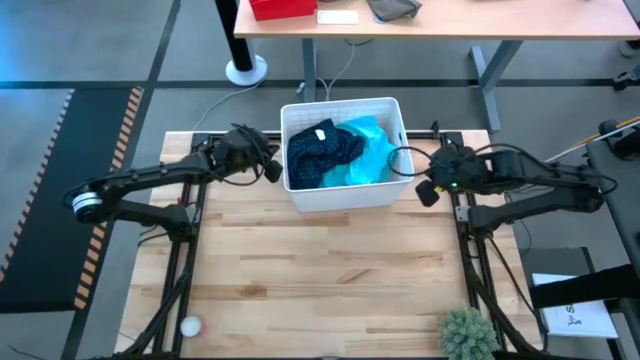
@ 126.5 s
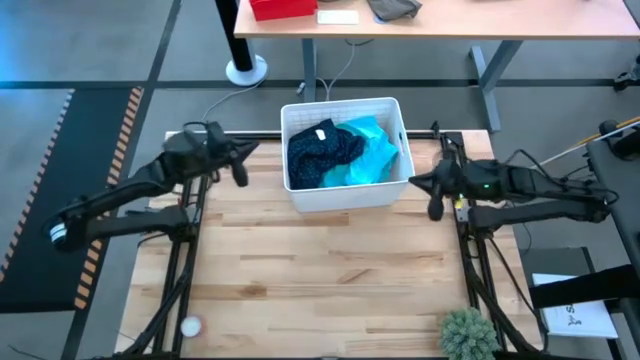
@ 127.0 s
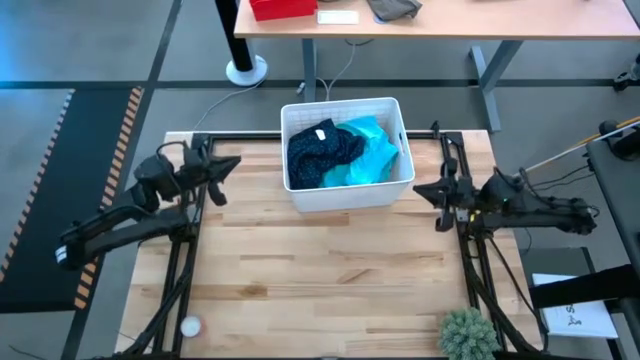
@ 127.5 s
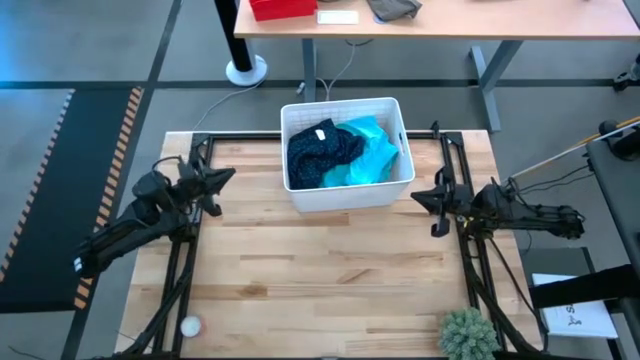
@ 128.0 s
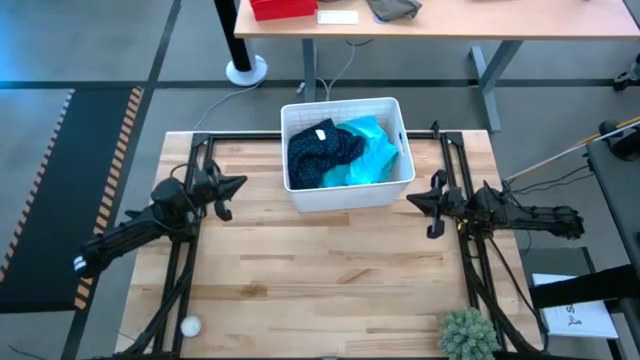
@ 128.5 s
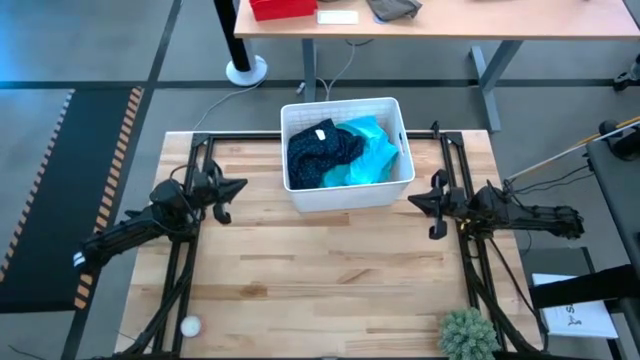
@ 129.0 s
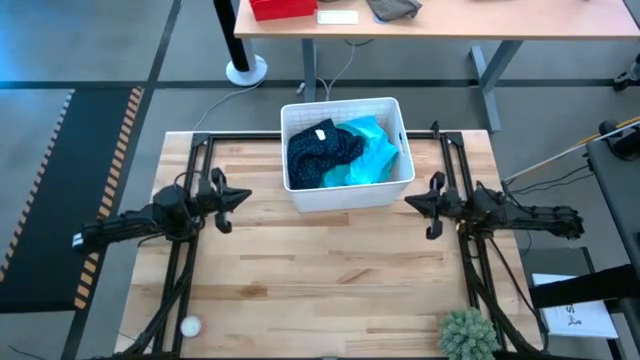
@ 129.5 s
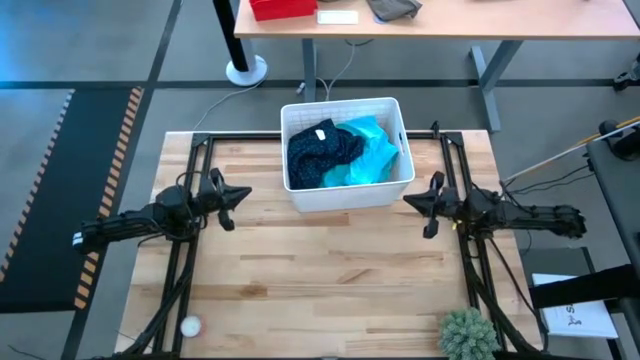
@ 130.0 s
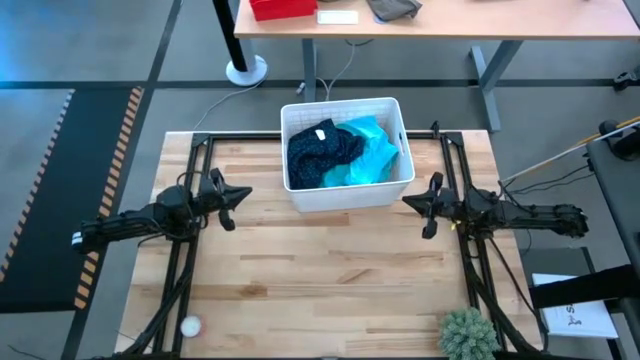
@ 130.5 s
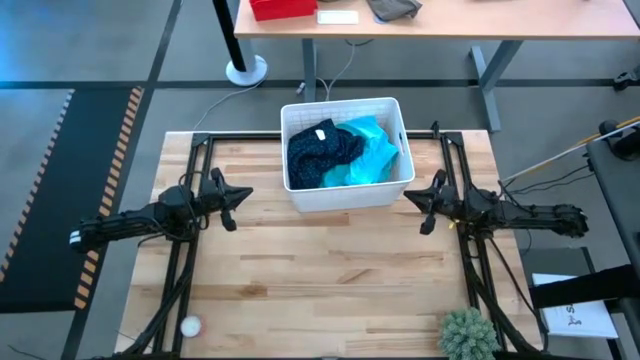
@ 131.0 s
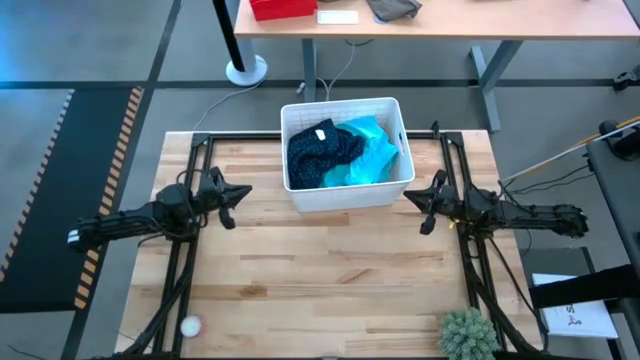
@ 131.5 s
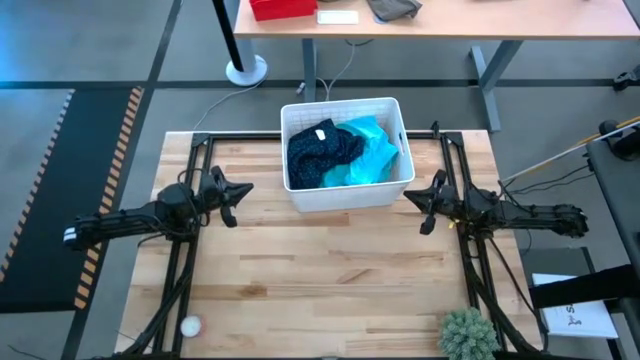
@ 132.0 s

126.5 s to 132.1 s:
Task: Sort clothes
Return to home position

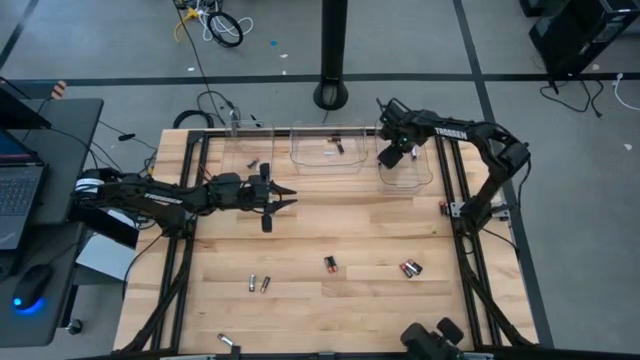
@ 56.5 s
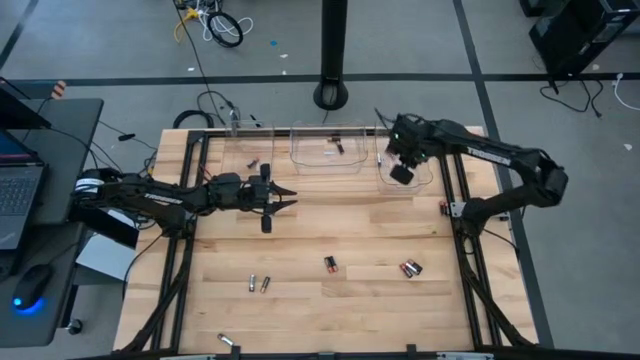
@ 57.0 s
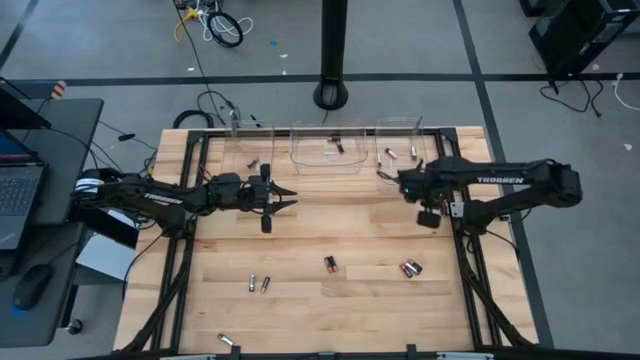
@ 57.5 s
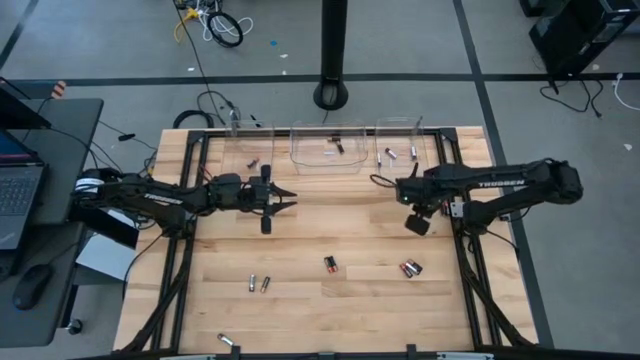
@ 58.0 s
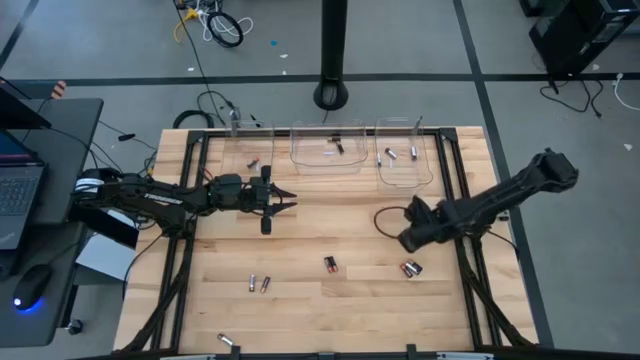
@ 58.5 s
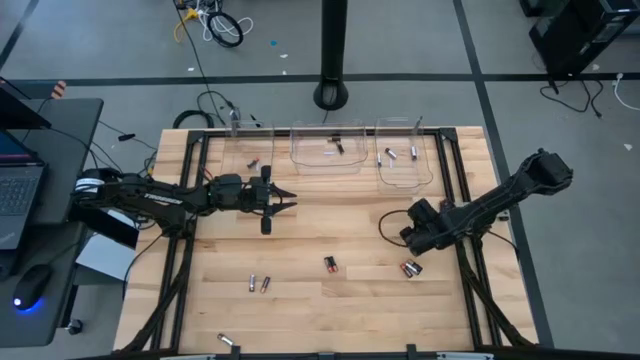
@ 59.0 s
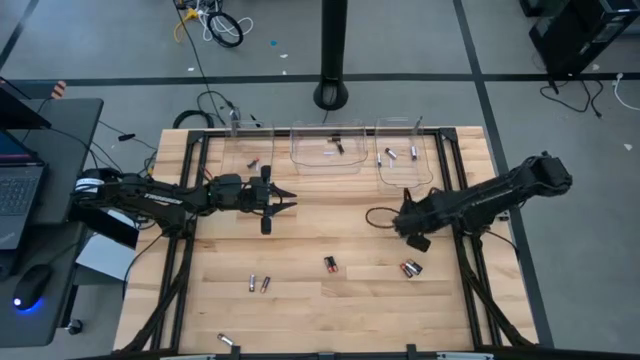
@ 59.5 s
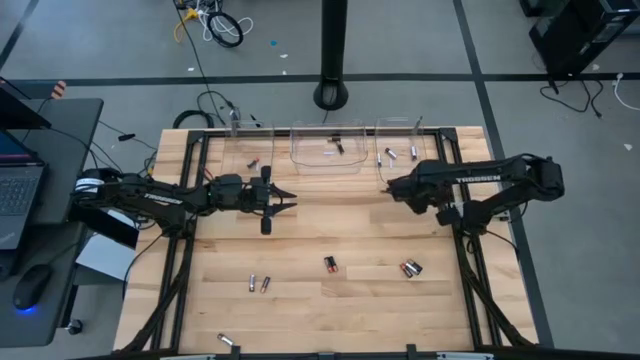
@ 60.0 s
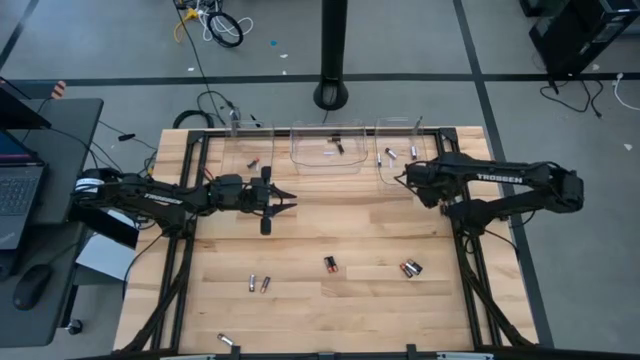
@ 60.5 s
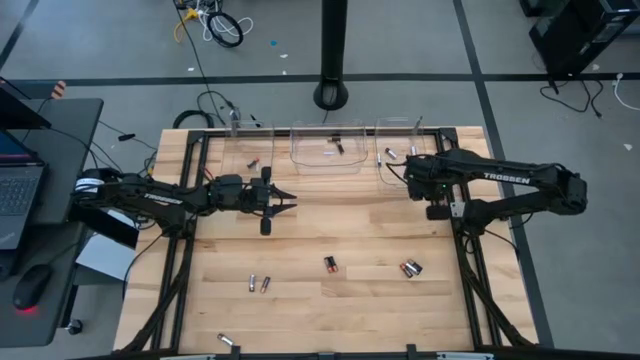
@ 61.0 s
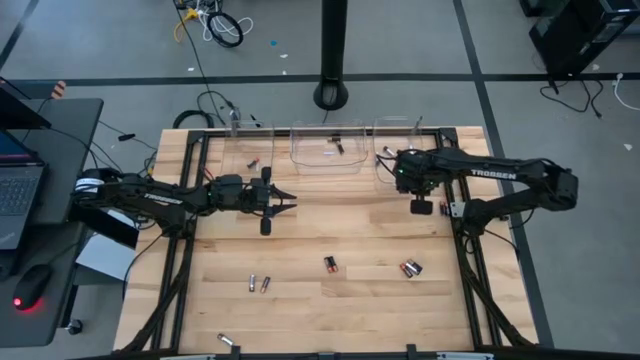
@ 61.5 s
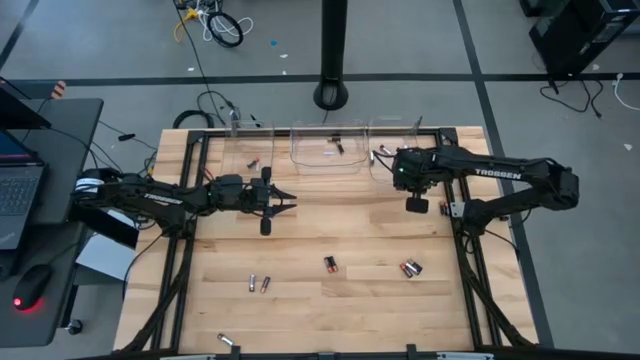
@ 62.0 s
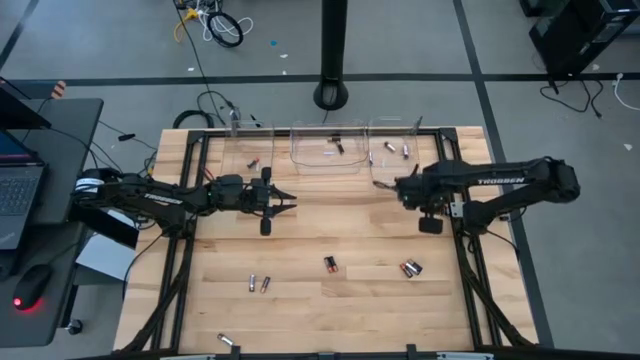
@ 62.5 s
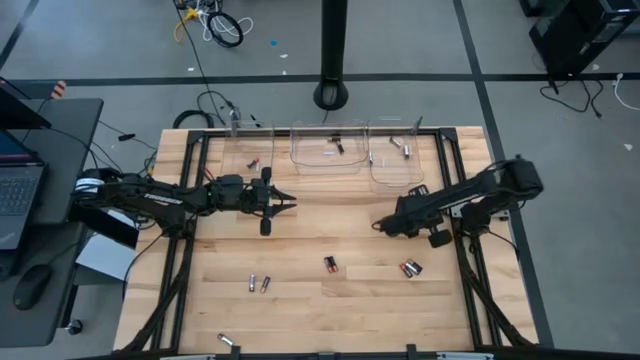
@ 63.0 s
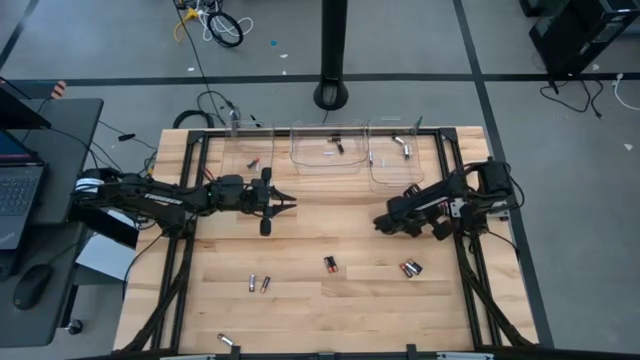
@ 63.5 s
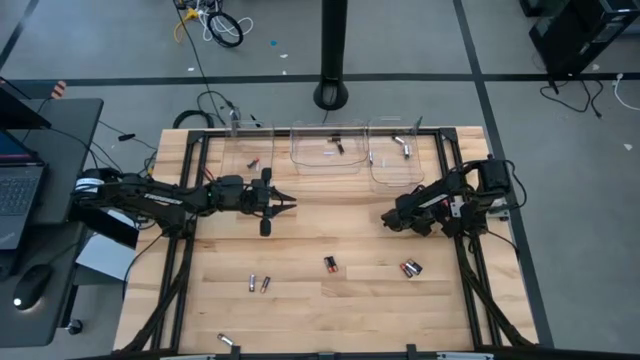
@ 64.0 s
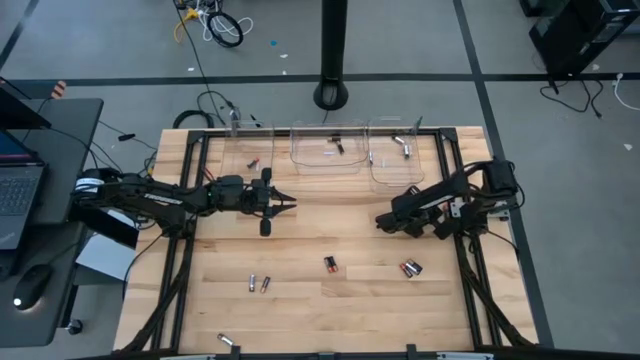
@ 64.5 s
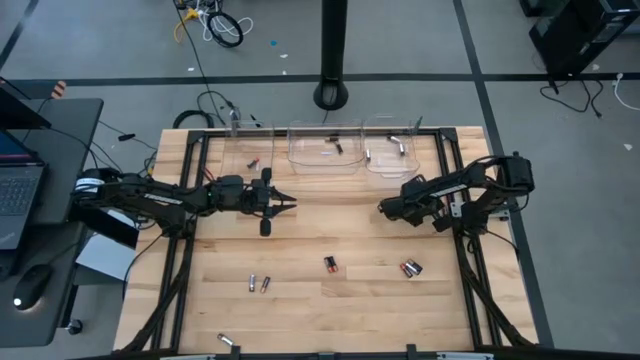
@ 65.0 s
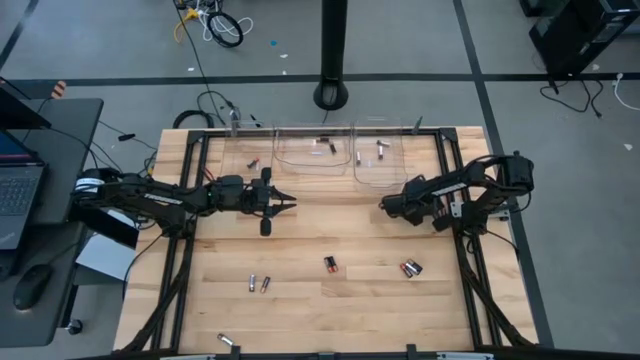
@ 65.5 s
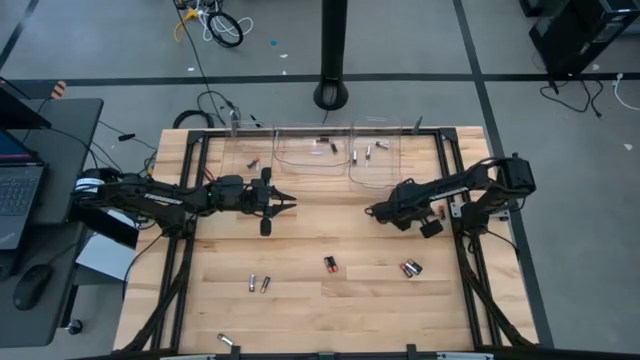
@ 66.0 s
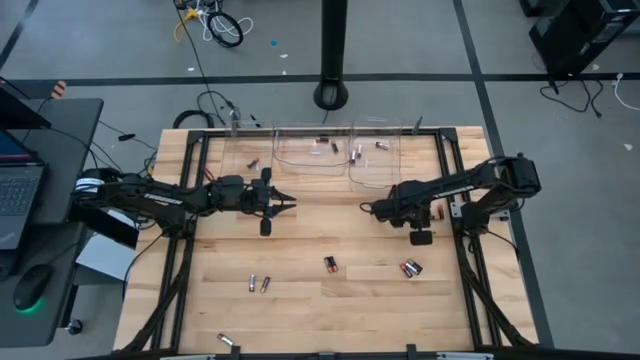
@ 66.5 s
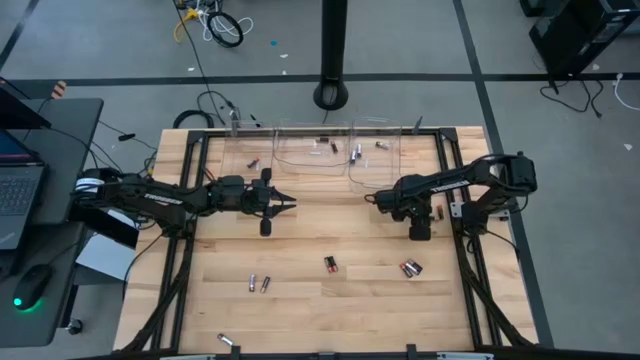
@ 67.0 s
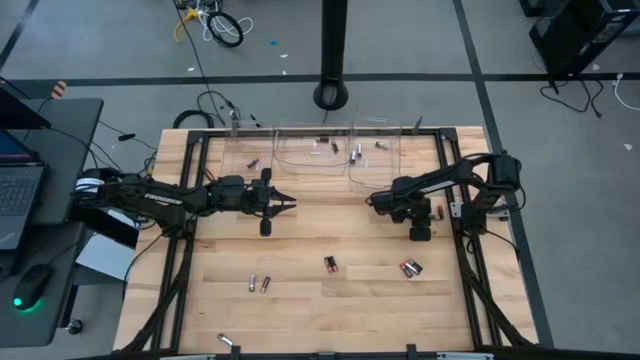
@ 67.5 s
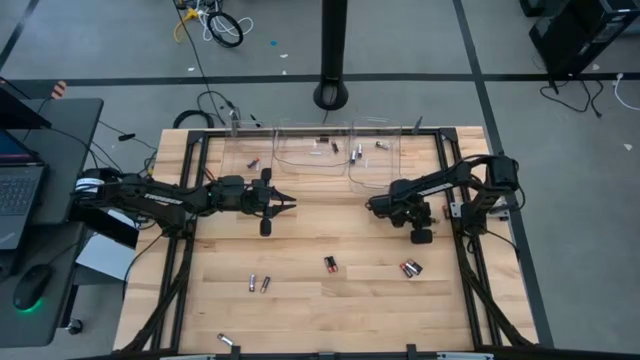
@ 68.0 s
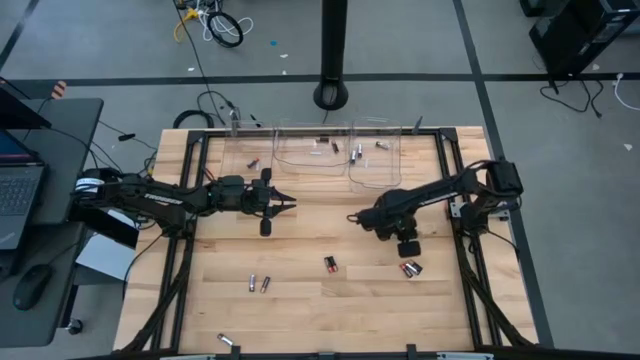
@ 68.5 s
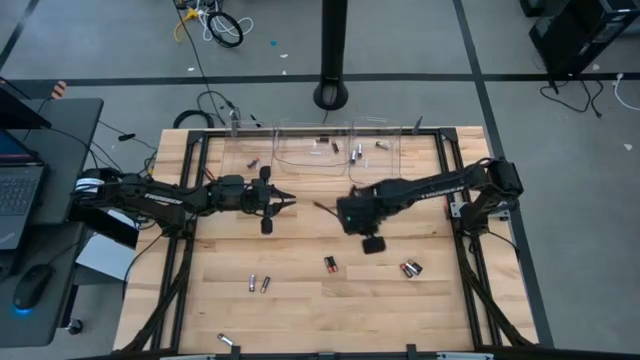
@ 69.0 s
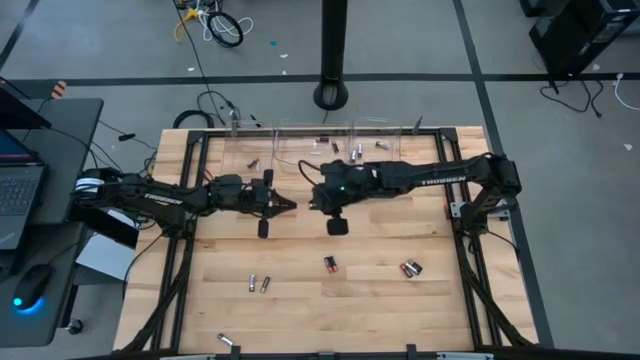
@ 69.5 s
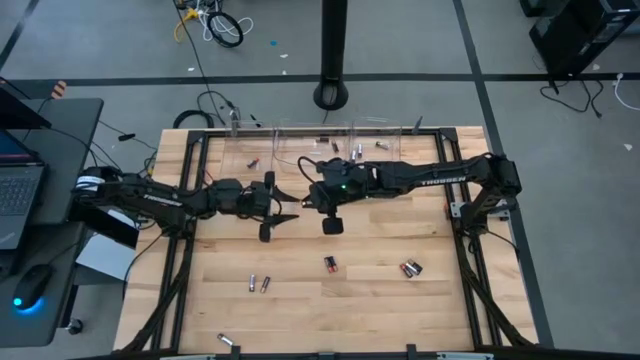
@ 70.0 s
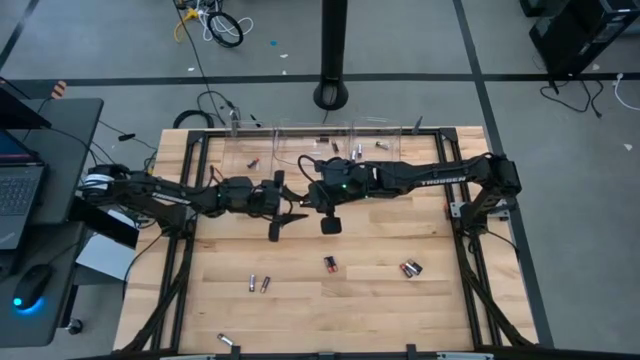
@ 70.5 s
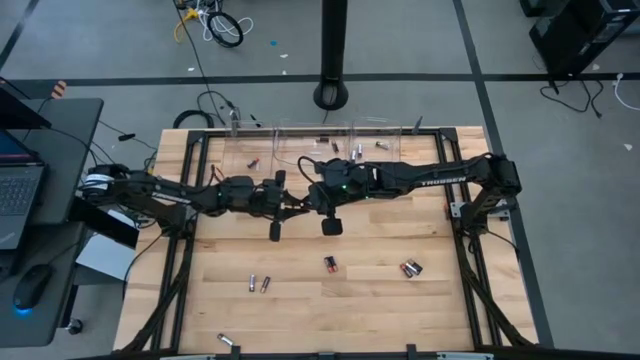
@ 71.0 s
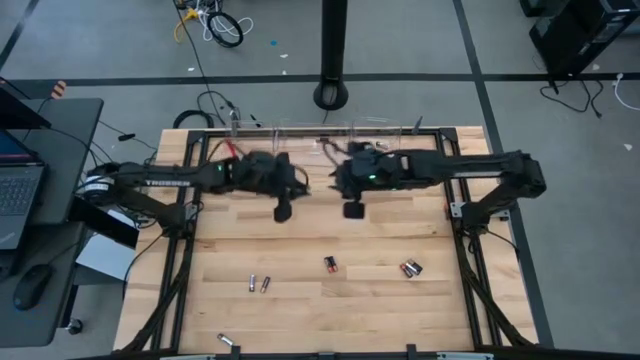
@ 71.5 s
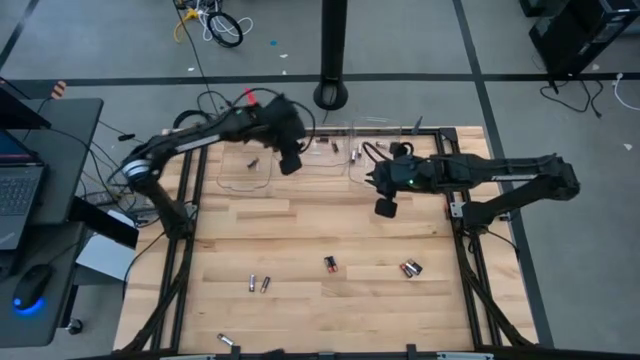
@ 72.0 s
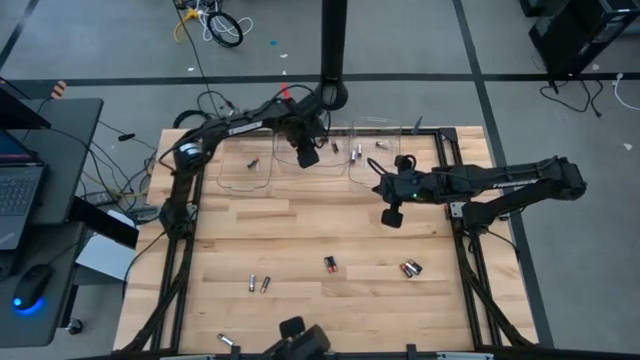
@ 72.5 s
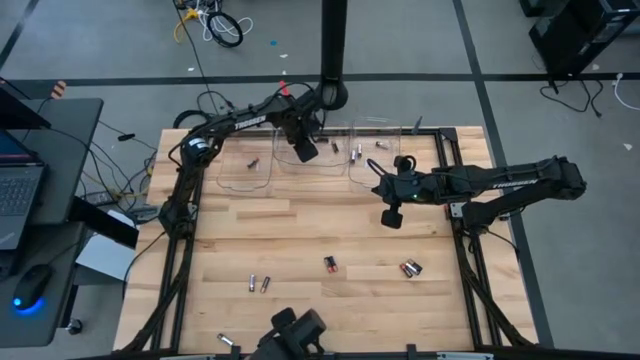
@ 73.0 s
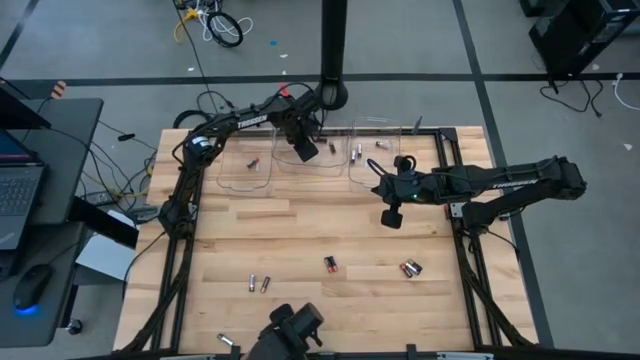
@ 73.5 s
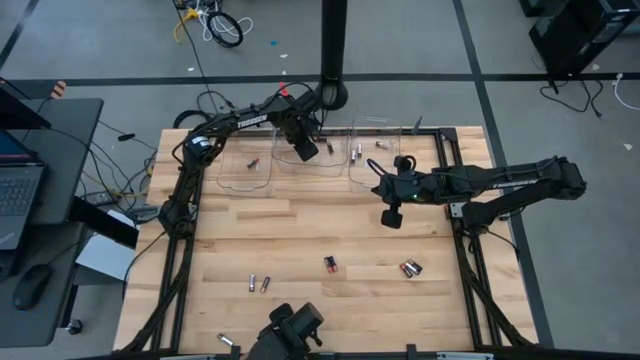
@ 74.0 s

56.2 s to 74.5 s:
Task: Sort batteries
Put the black battery into the middle transparent bin
